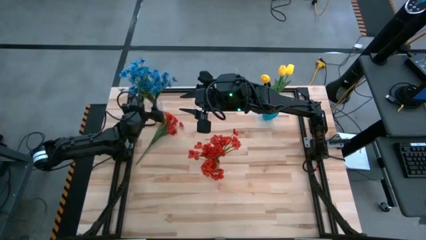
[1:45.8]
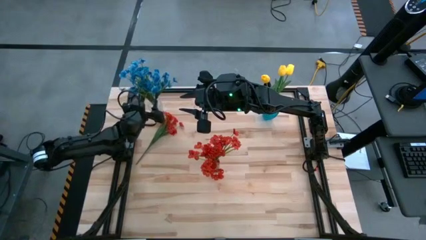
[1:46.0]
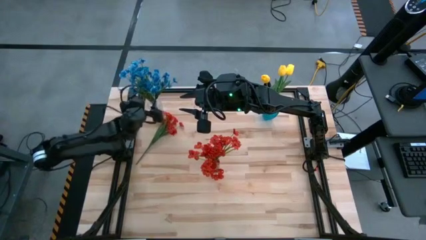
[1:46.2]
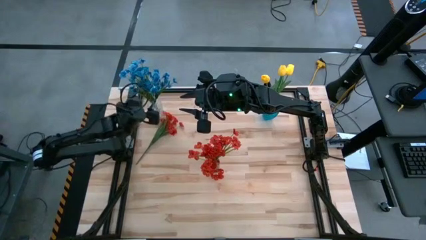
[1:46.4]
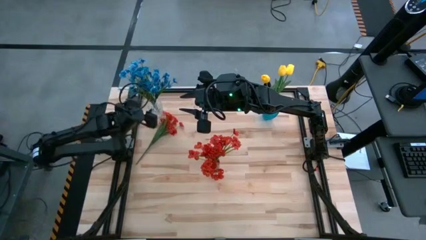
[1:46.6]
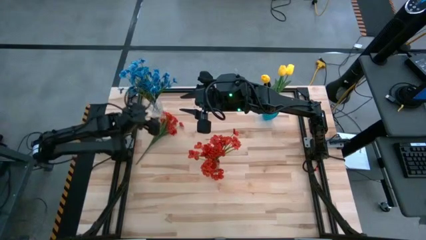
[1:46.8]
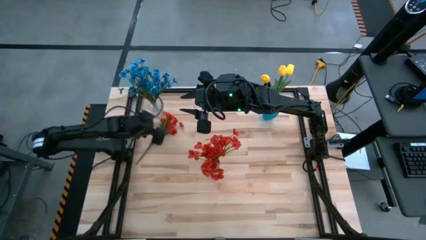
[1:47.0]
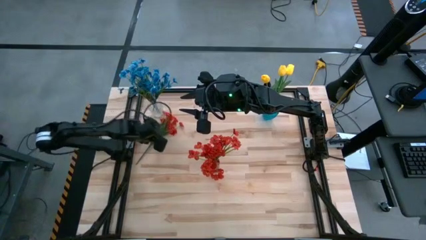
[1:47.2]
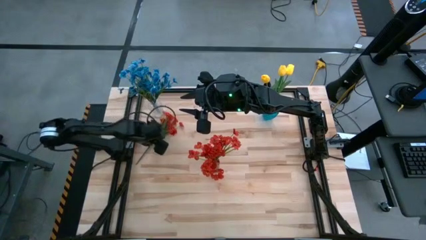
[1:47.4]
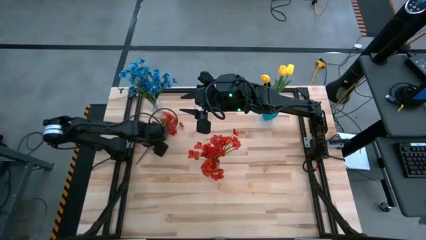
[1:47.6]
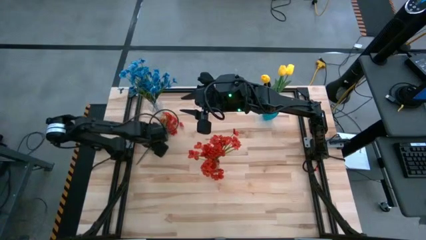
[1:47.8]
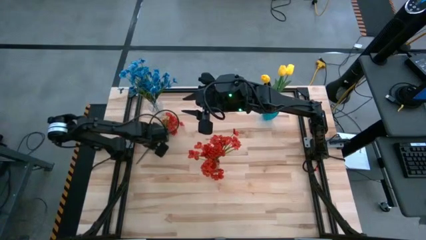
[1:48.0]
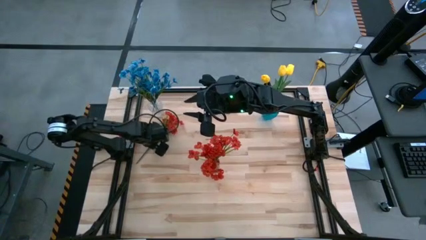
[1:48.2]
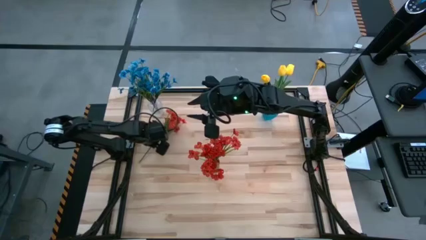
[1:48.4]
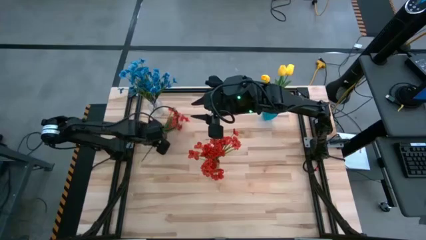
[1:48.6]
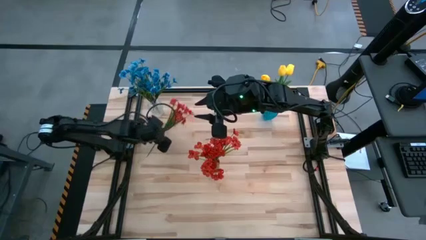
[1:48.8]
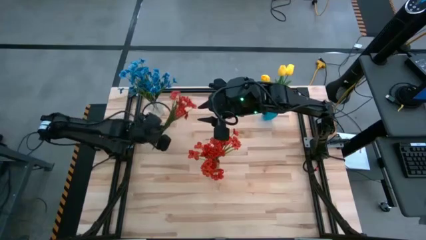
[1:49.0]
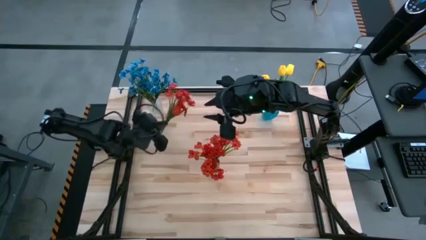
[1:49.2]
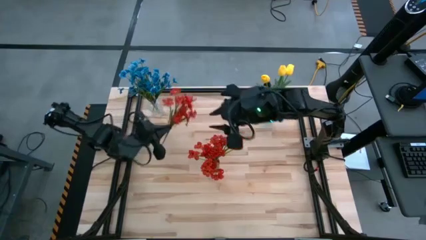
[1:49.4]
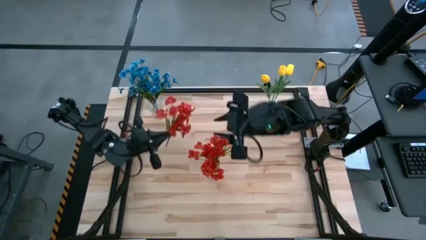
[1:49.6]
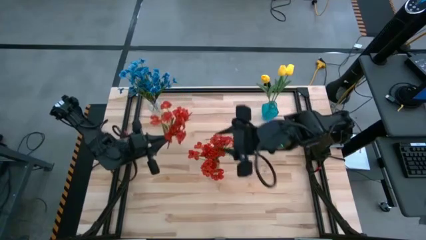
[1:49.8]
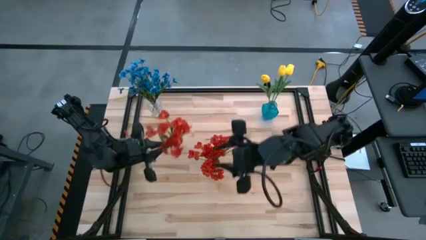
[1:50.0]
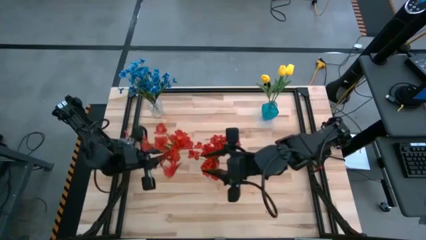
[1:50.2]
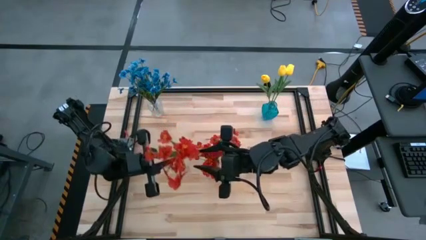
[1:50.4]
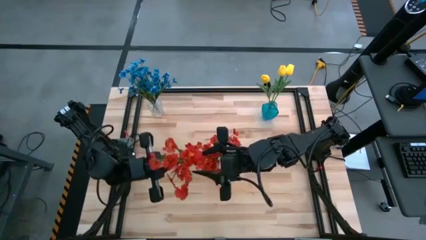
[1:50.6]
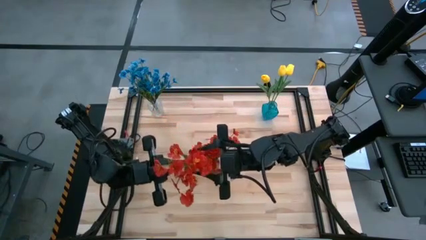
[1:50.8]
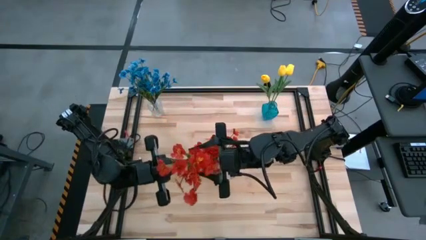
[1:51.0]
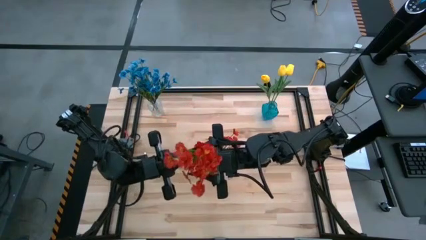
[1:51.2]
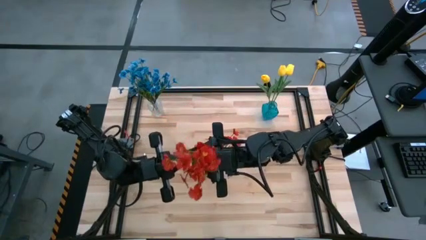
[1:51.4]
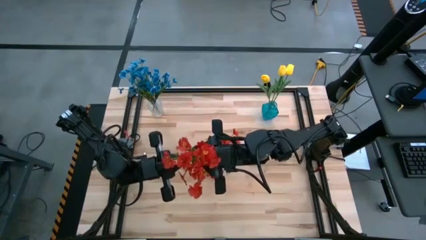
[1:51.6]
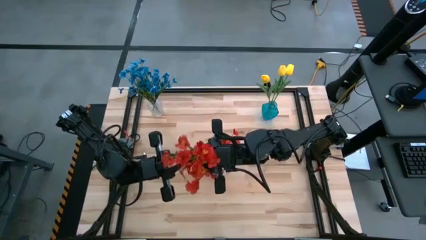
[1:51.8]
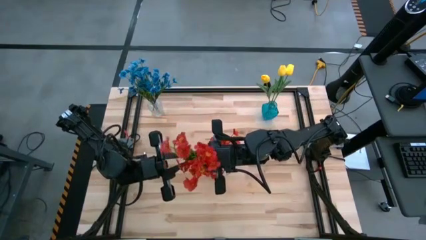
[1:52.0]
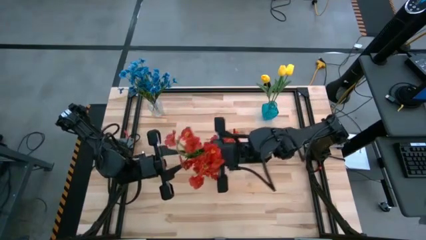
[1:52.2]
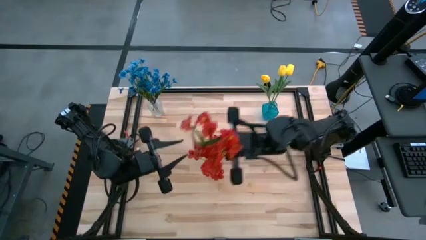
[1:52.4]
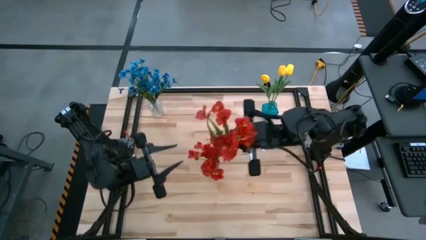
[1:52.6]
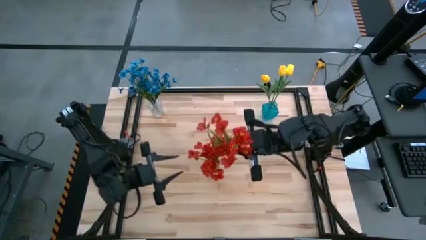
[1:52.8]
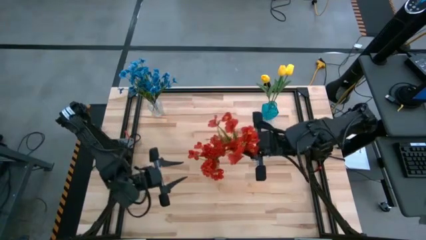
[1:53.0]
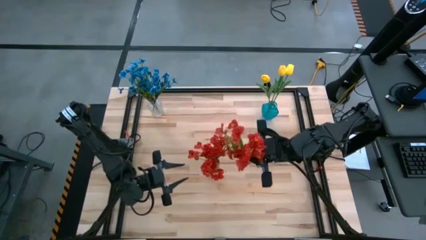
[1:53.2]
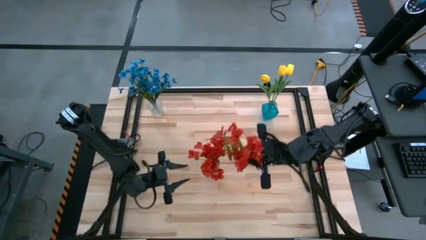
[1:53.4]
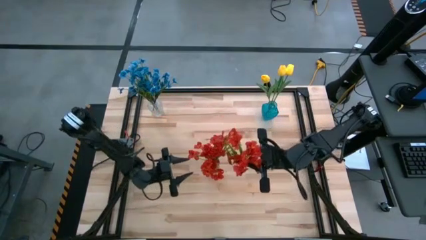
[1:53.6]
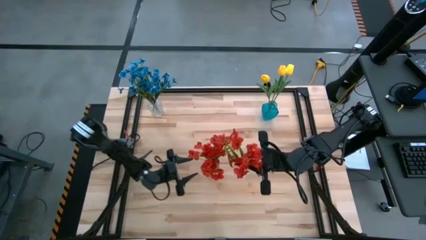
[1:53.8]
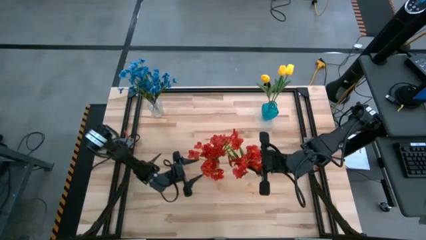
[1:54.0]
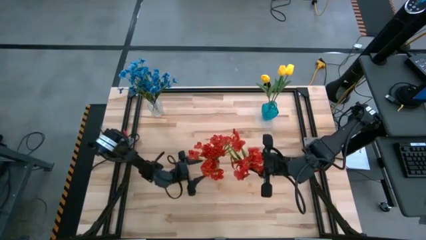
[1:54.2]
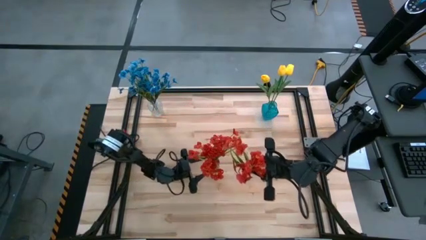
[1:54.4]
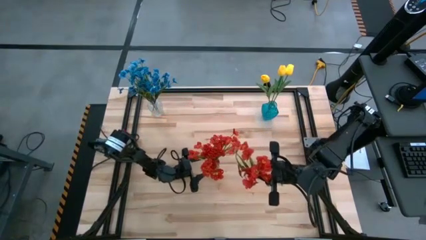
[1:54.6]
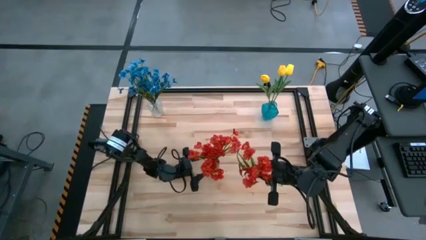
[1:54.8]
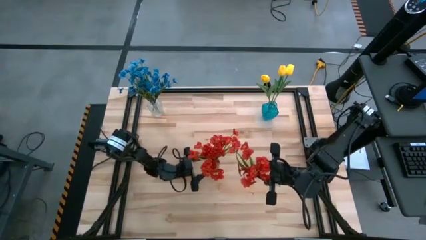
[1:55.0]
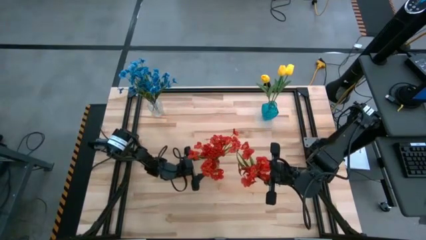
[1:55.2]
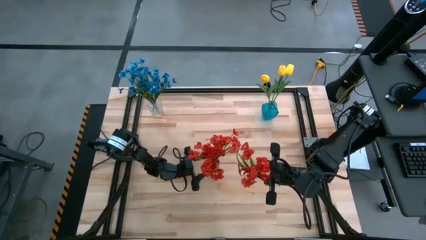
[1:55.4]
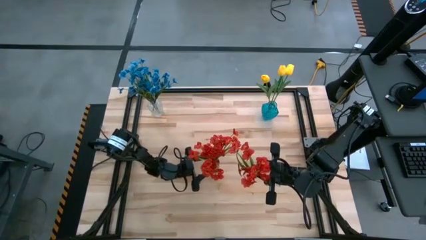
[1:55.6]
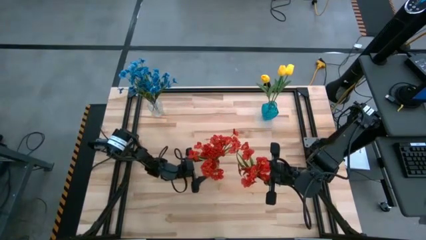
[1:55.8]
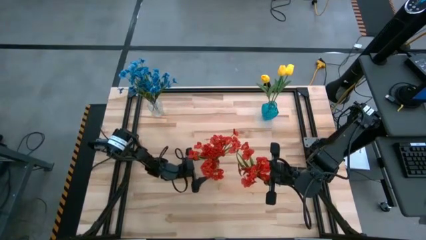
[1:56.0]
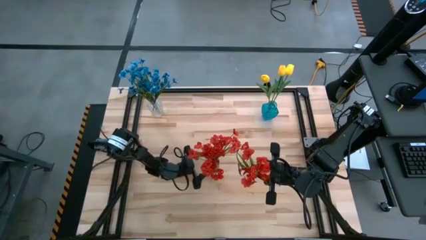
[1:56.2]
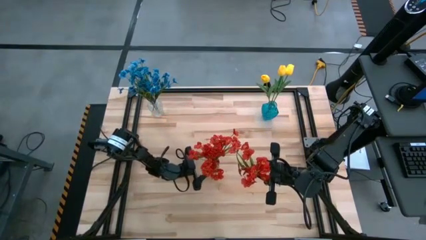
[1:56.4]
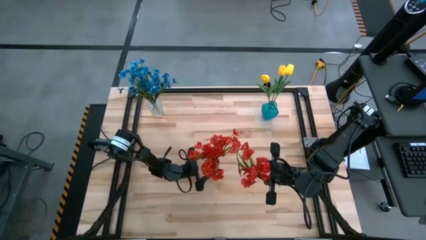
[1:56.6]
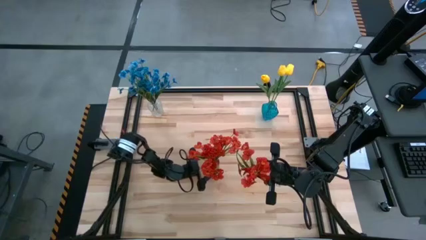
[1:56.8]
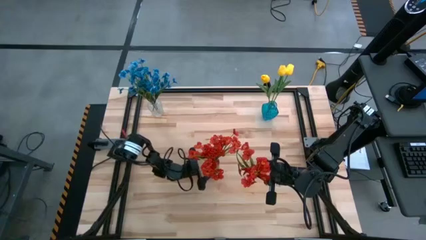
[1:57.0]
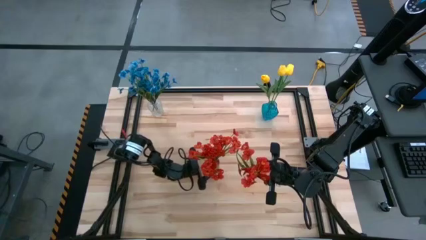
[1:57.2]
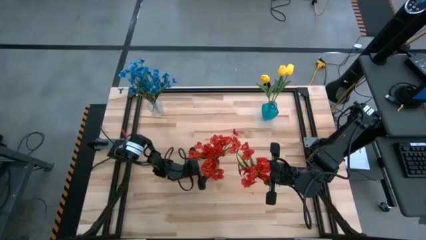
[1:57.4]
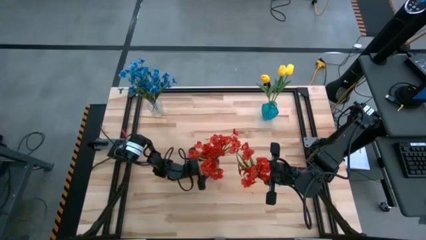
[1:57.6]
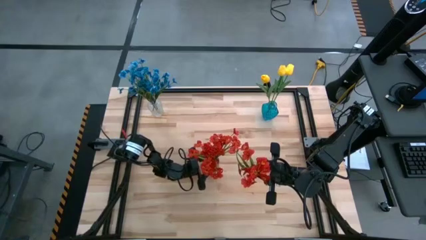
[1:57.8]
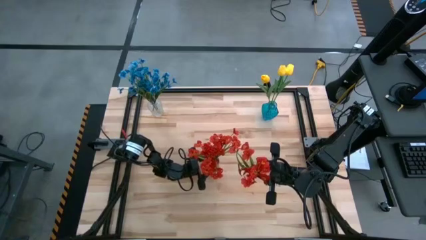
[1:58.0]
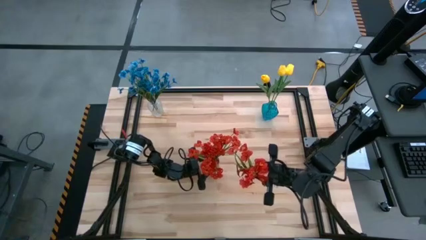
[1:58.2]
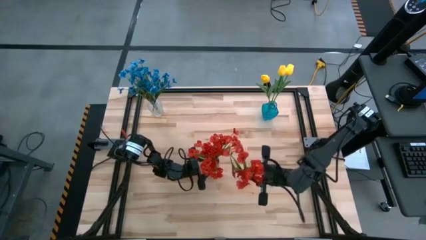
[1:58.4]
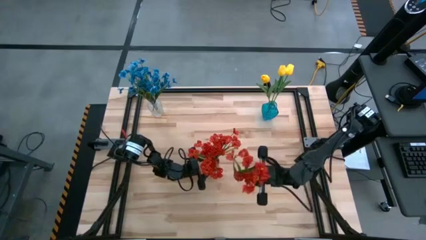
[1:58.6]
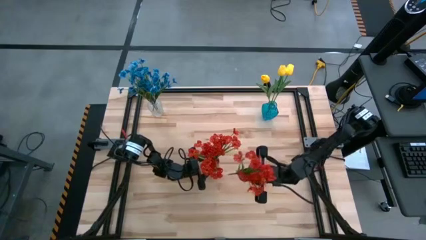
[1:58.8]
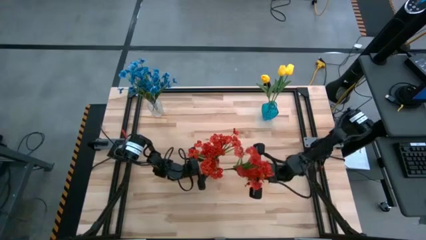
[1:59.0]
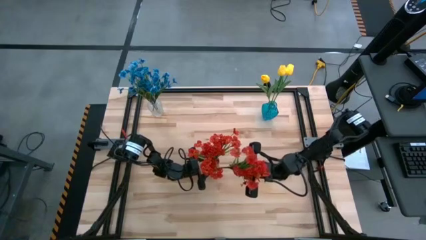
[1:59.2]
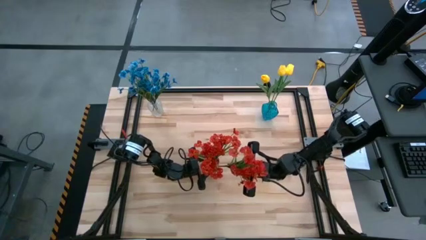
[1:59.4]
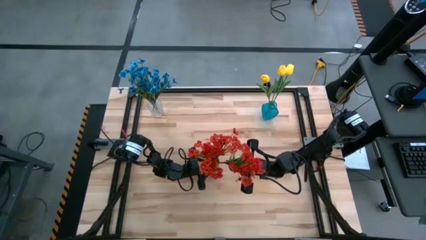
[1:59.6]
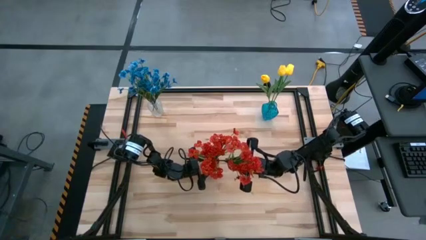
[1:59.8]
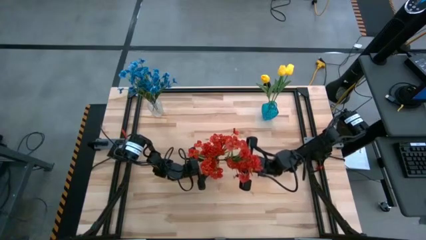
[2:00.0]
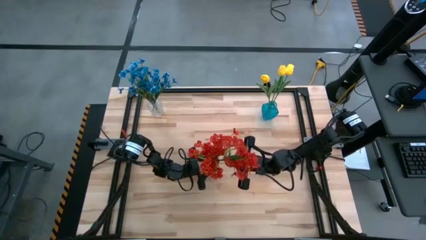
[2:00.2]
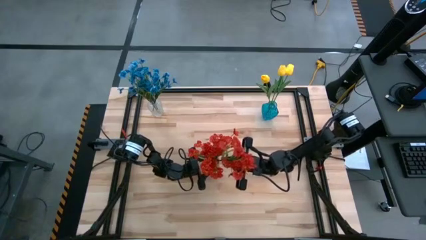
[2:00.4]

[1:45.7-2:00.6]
Task: Sort flowers into vase by color
Put the red flowers into the red vase
